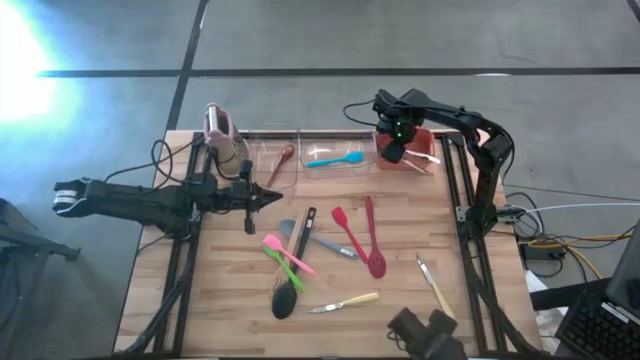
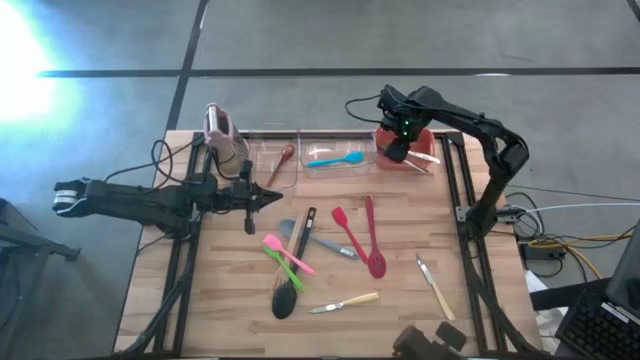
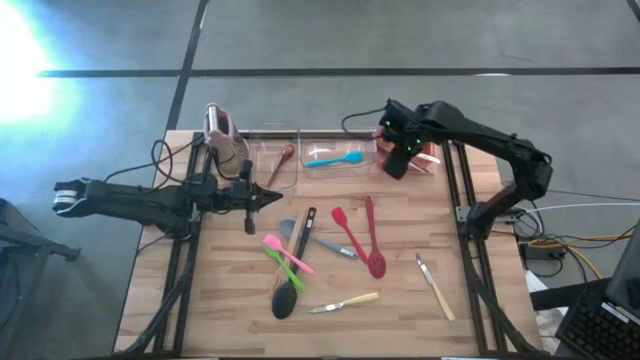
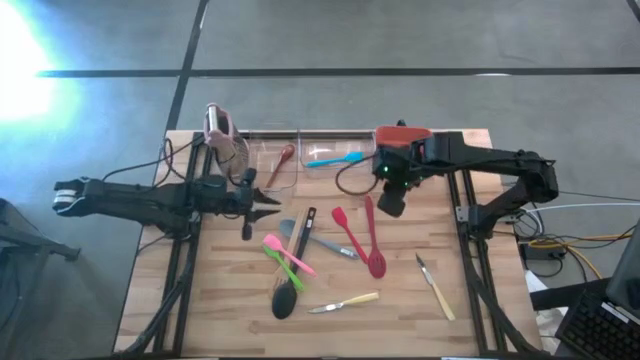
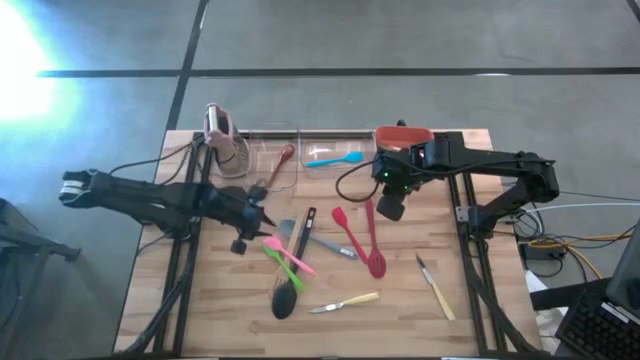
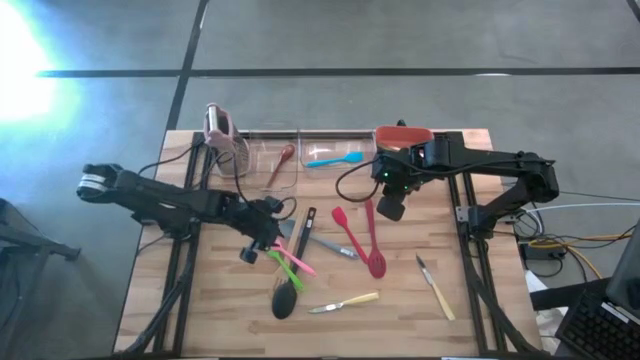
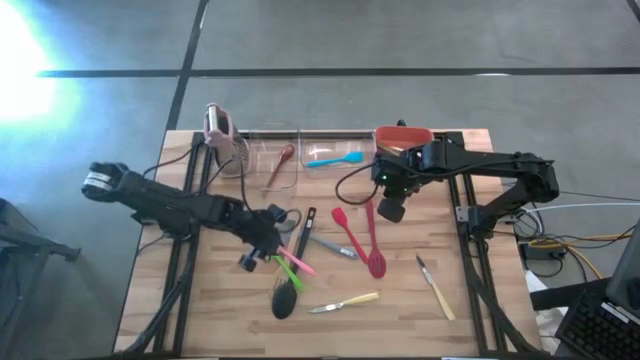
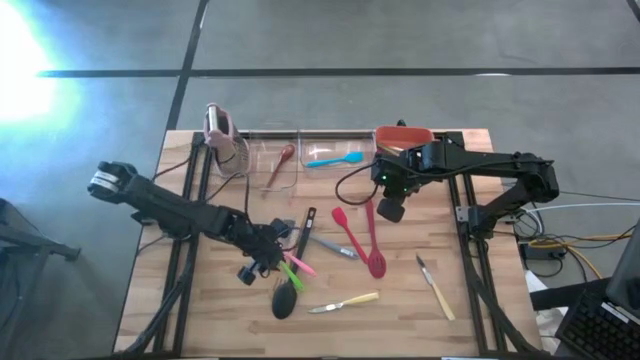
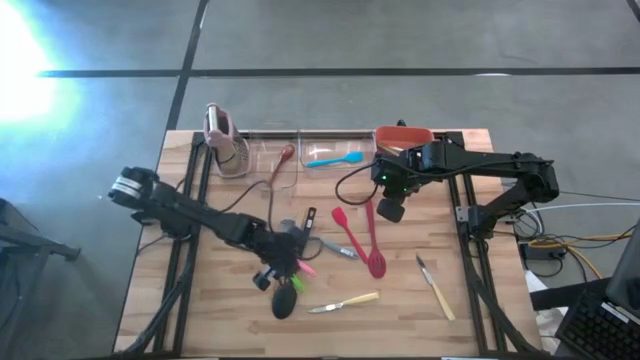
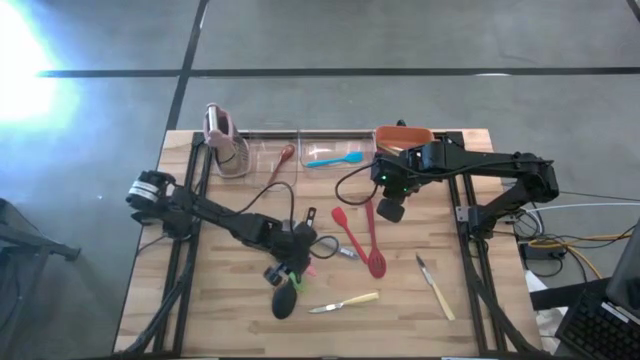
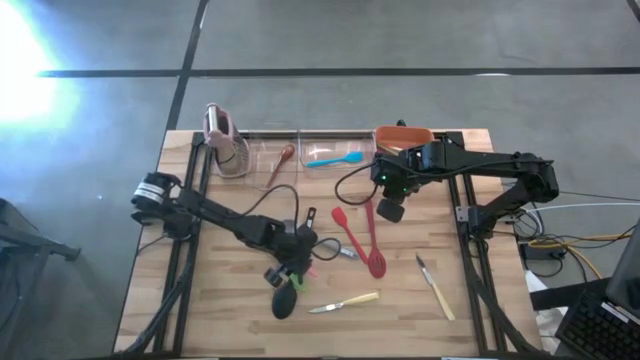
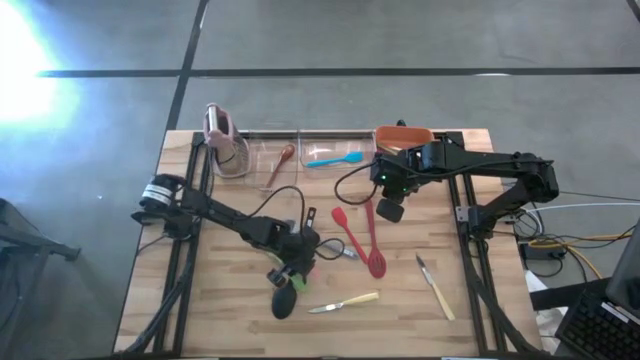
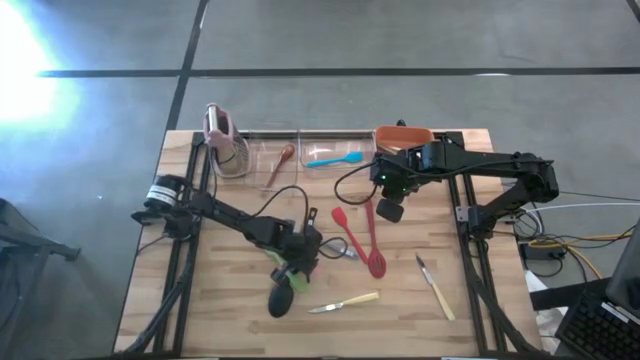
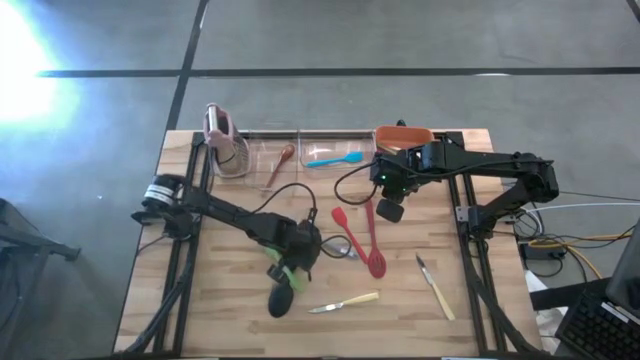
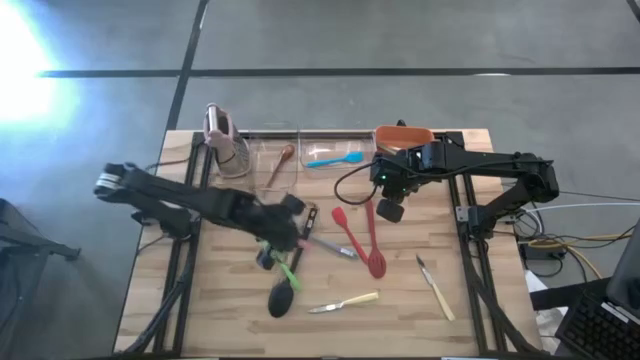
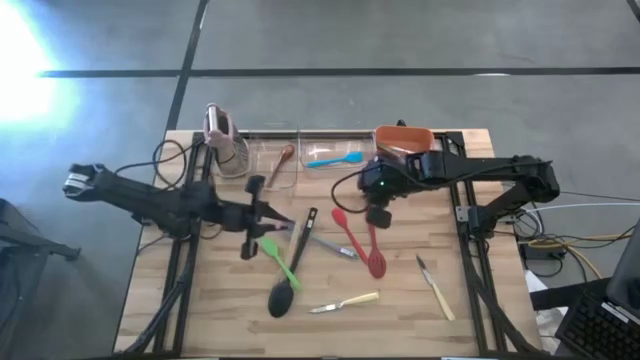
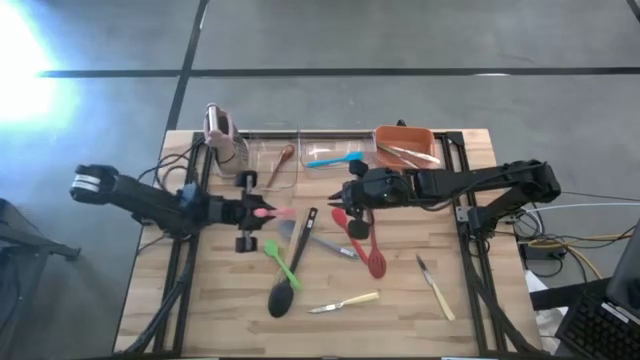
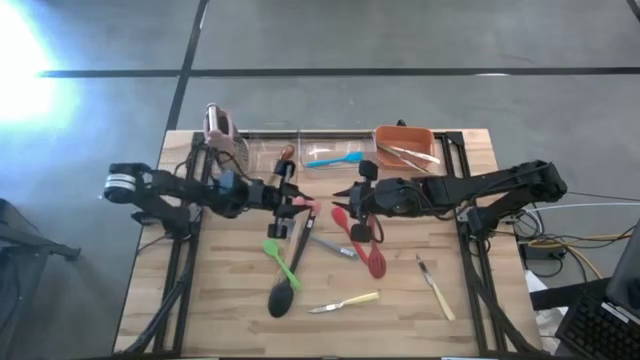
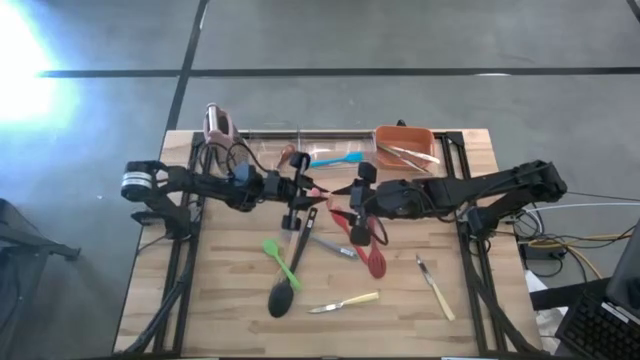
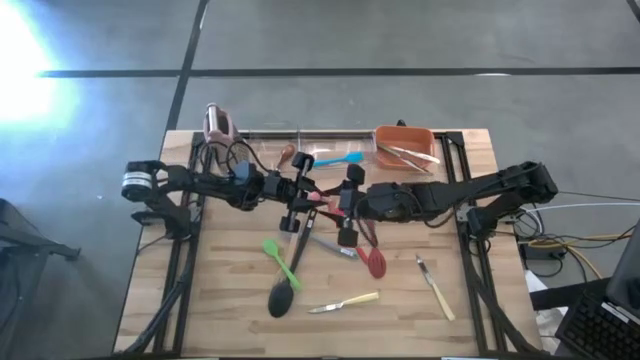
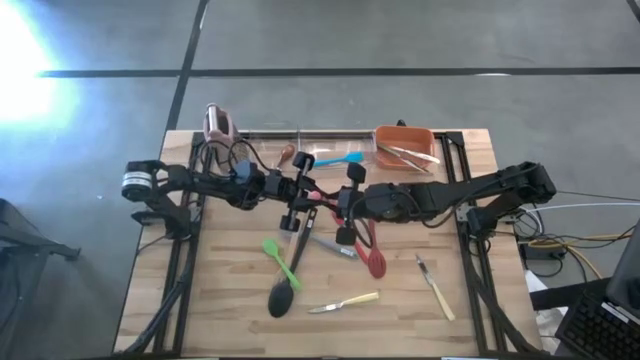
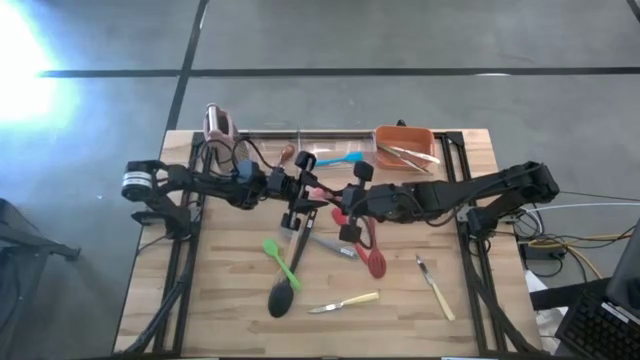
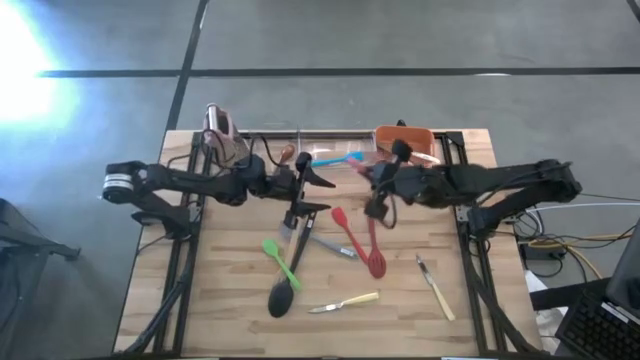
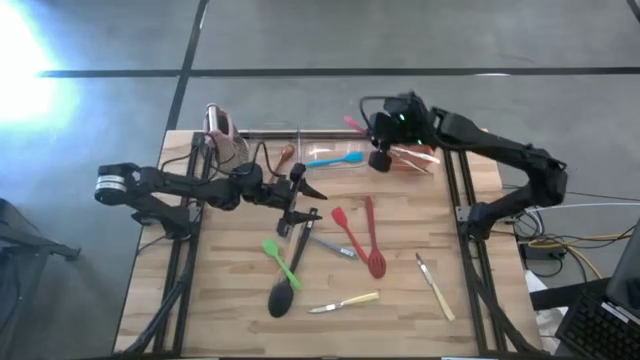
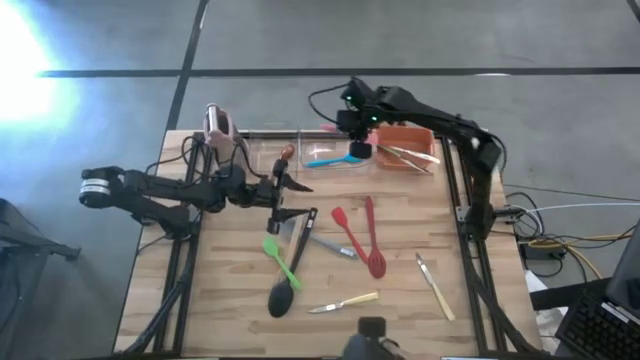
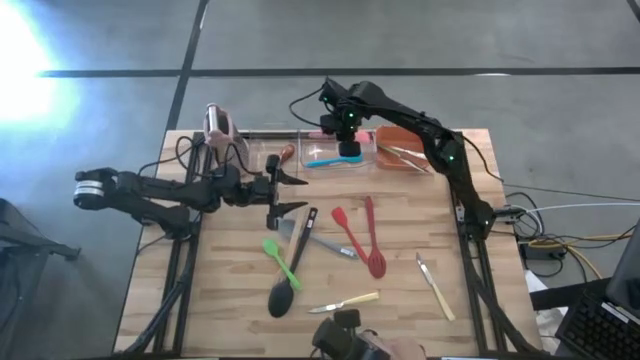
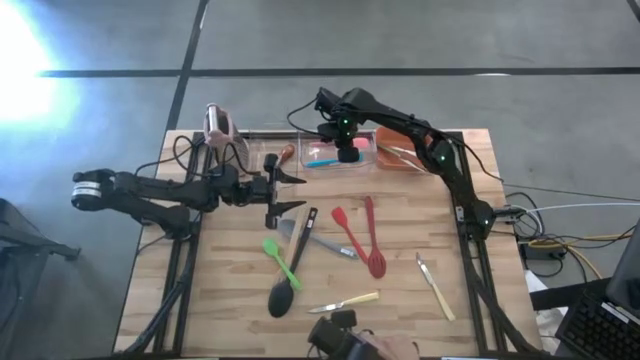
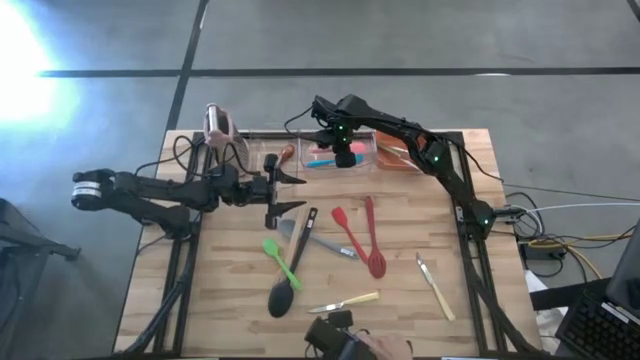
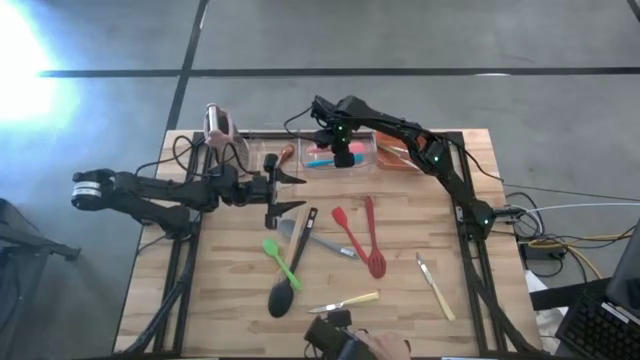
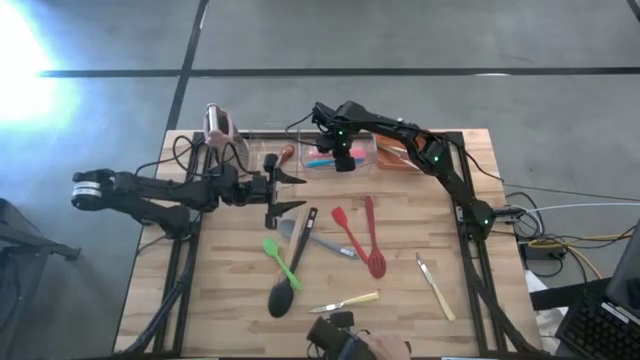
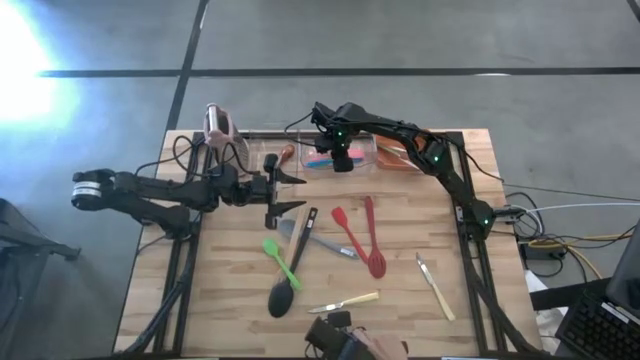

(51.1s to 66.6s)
Task: Pick & Place Kitchen Items
Put the pink spatula into the right transparent bin

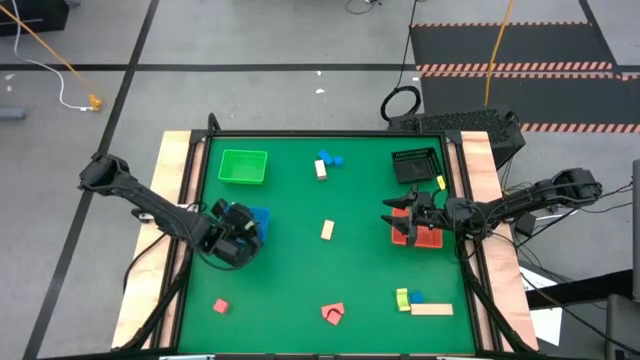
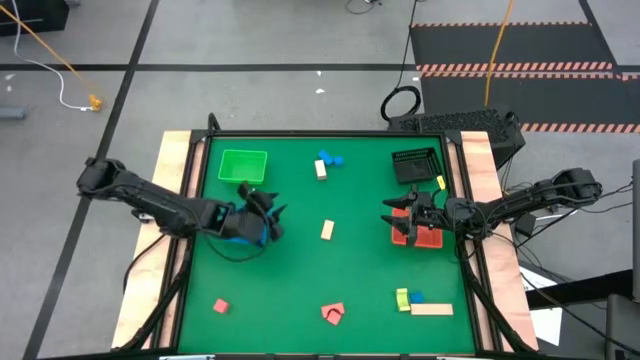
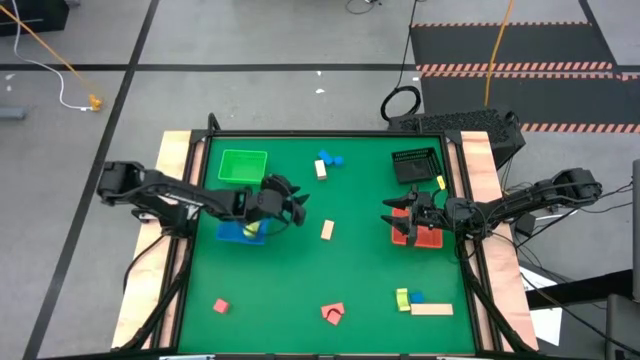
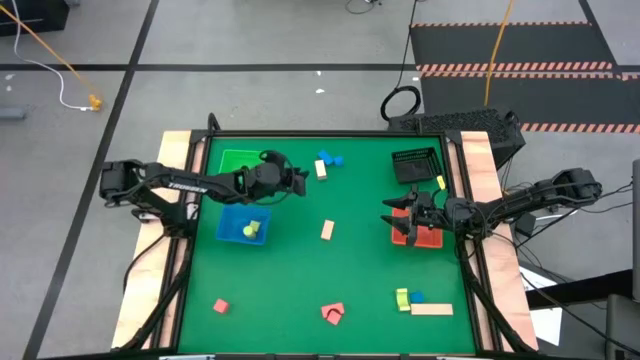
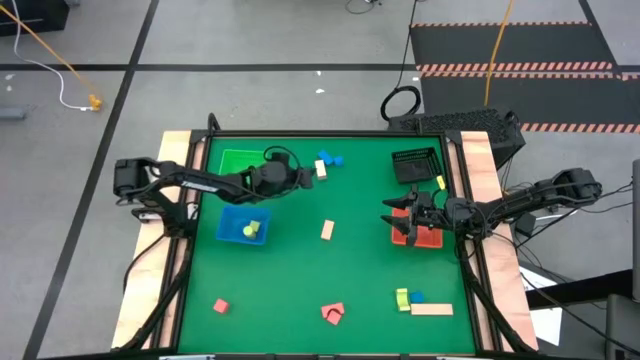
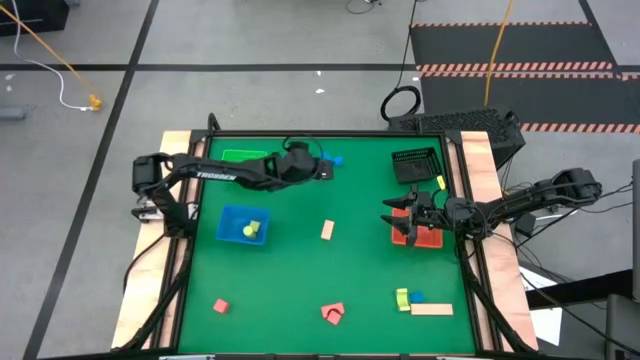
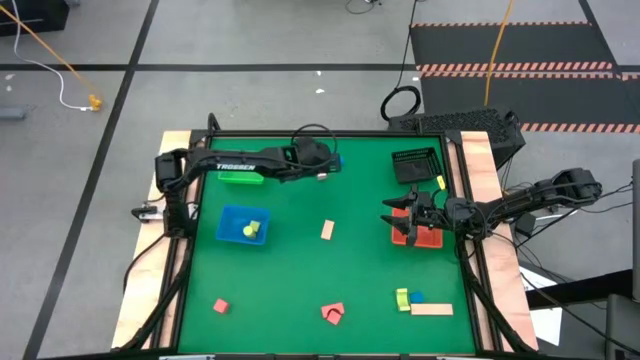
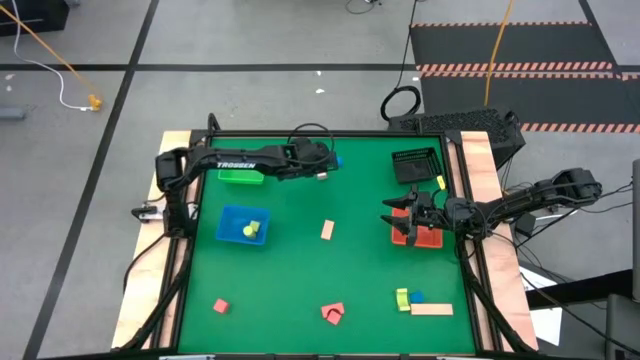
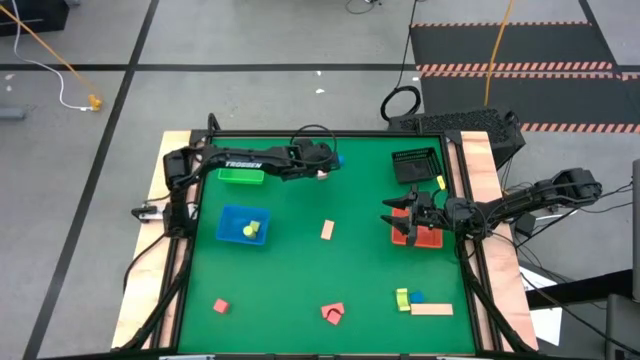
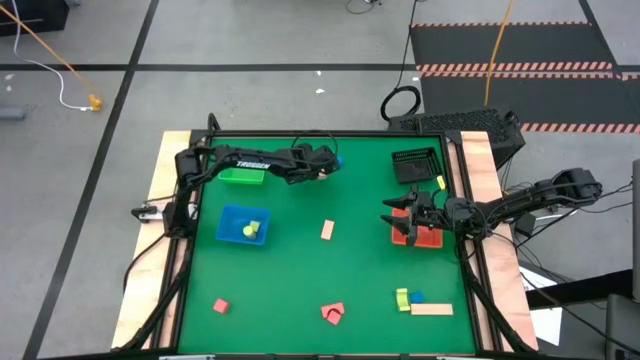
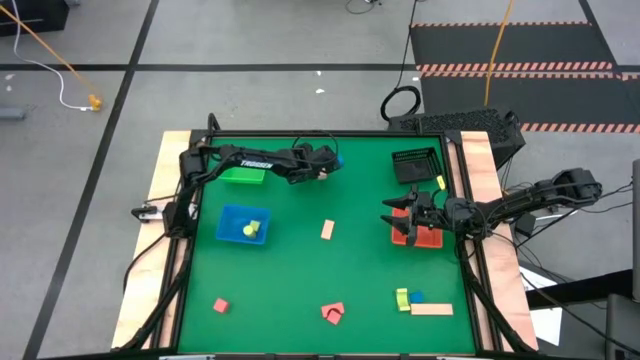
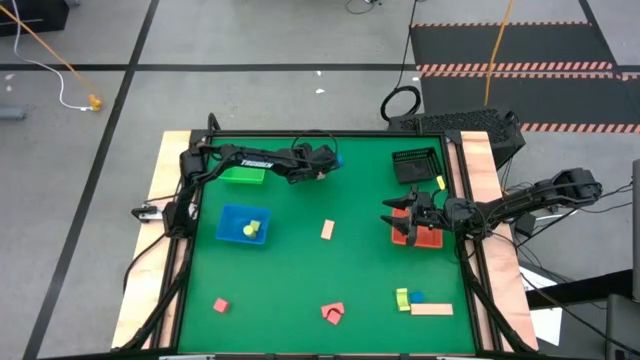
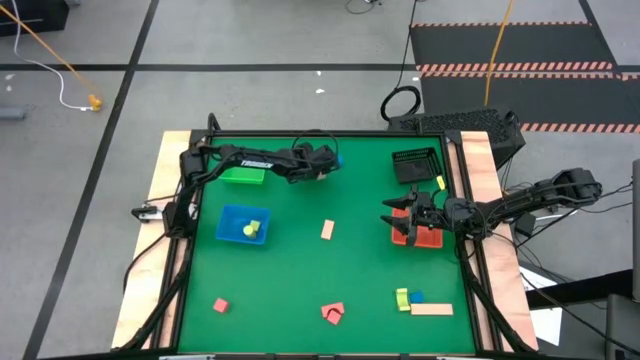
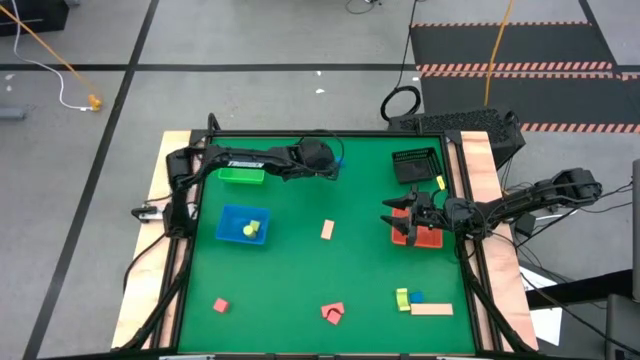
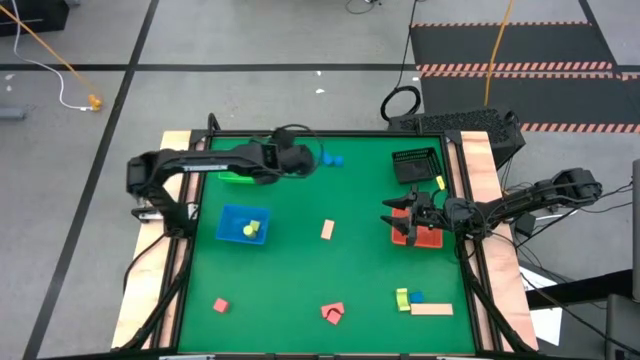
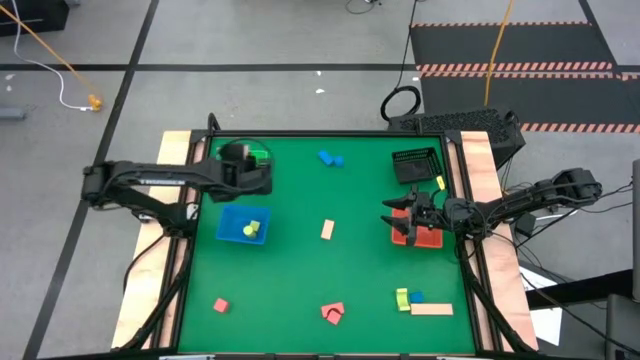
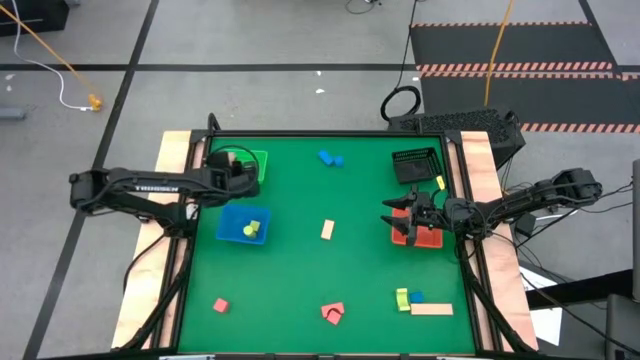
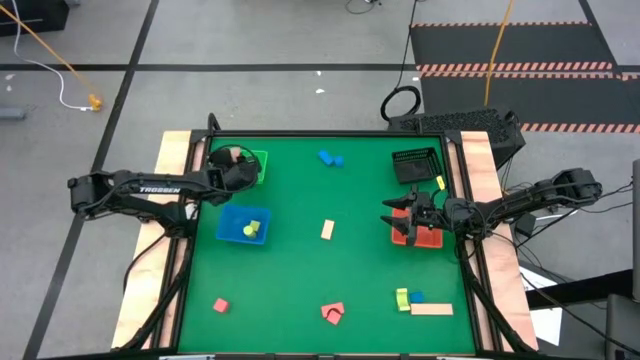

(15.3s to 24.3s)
Task: Sort & place blocks by color
Put the top center brown block into the green bin
